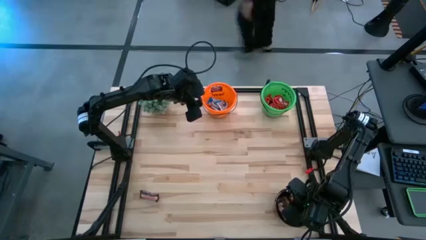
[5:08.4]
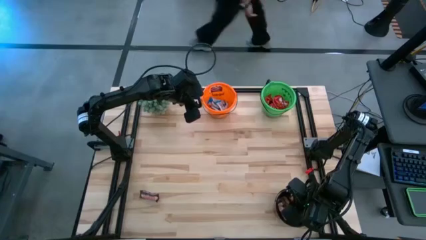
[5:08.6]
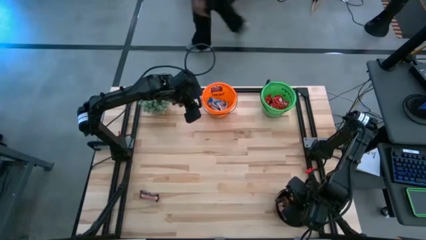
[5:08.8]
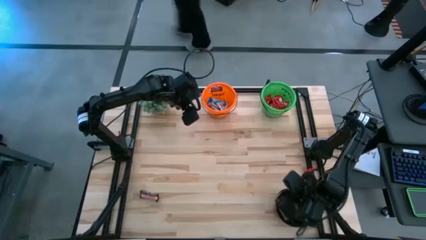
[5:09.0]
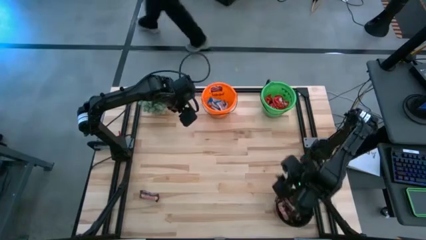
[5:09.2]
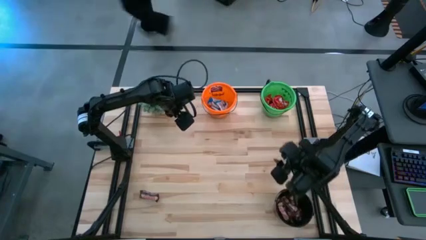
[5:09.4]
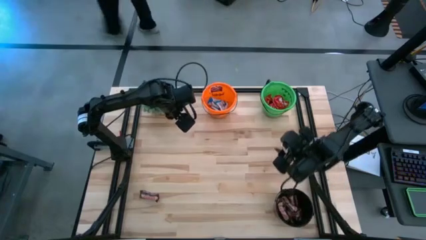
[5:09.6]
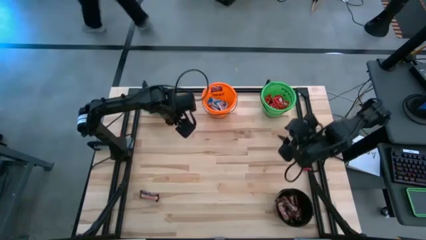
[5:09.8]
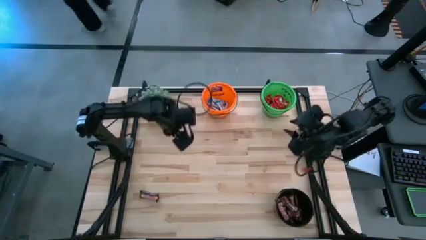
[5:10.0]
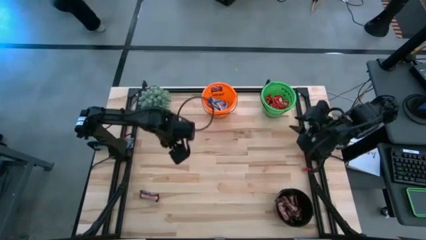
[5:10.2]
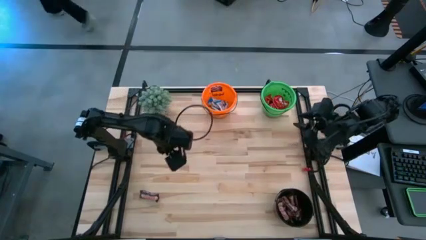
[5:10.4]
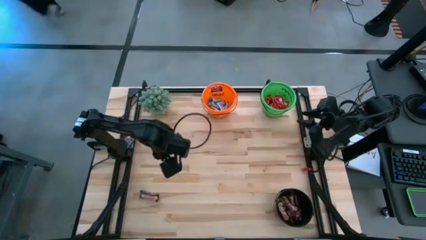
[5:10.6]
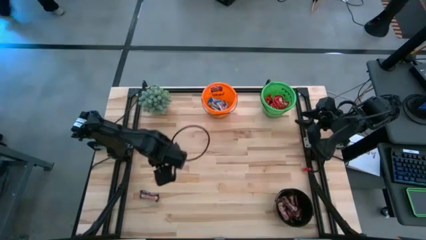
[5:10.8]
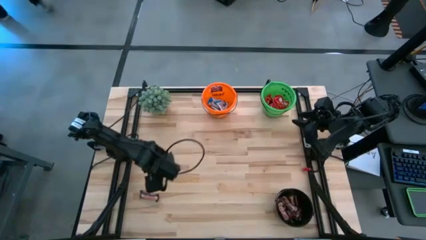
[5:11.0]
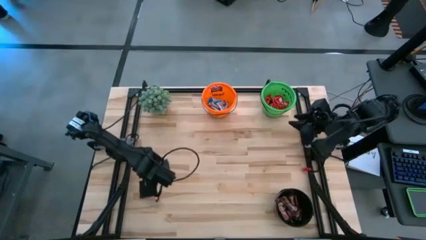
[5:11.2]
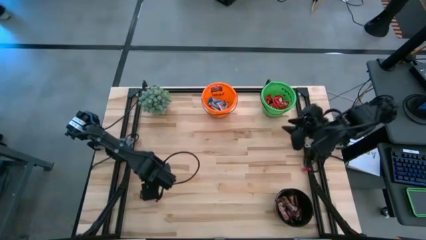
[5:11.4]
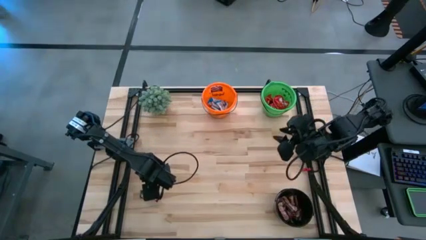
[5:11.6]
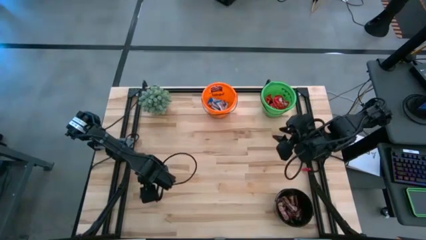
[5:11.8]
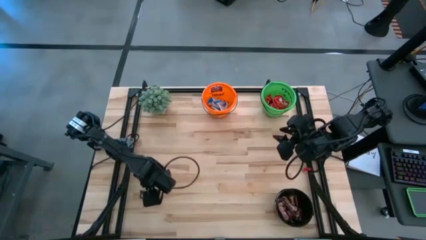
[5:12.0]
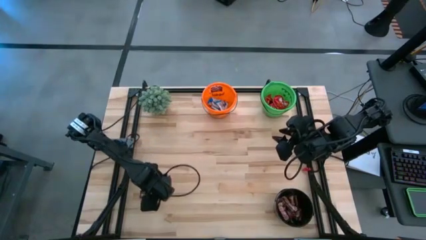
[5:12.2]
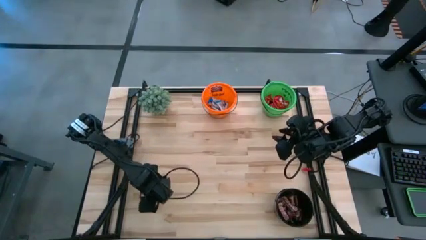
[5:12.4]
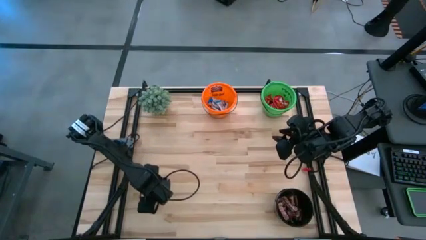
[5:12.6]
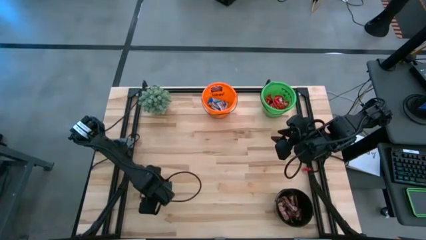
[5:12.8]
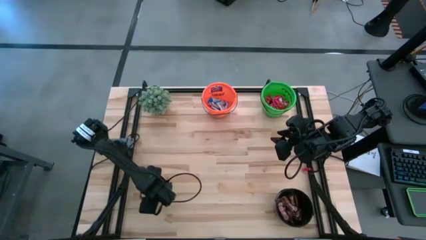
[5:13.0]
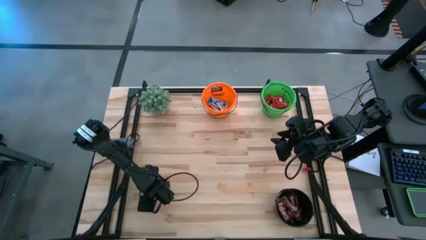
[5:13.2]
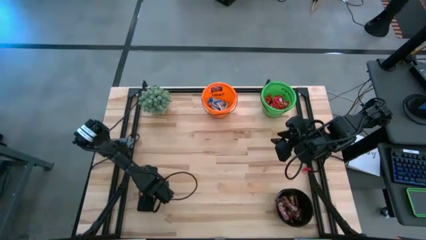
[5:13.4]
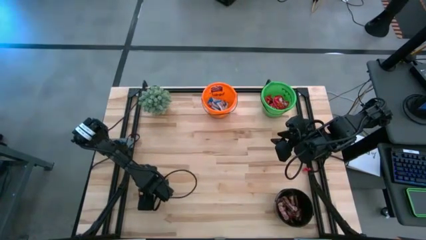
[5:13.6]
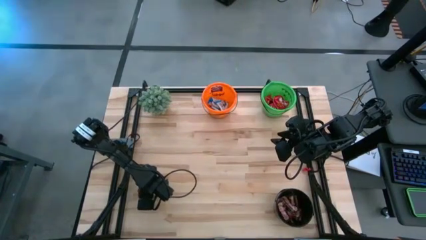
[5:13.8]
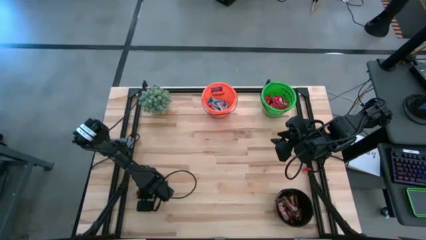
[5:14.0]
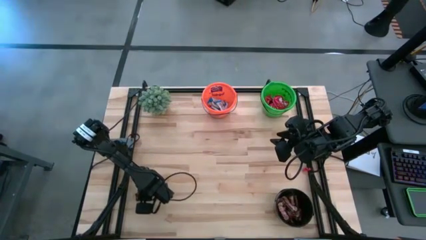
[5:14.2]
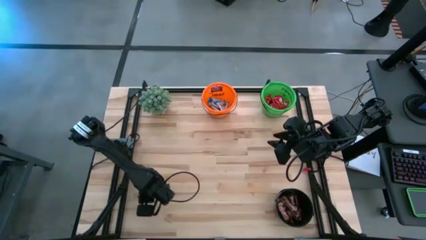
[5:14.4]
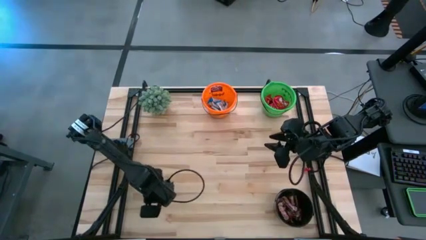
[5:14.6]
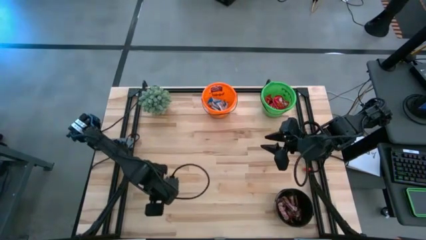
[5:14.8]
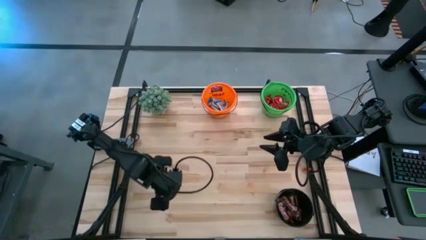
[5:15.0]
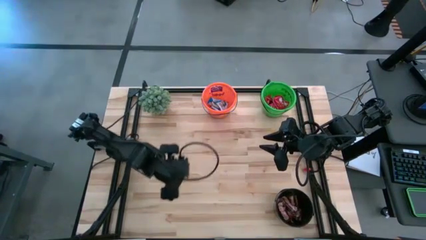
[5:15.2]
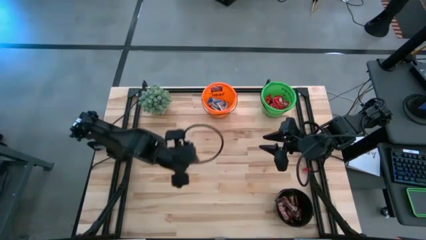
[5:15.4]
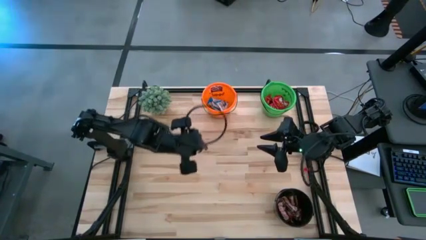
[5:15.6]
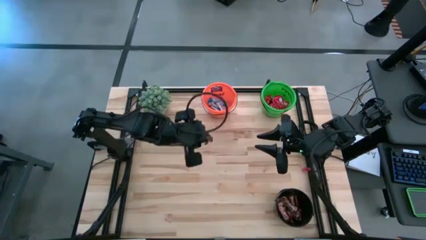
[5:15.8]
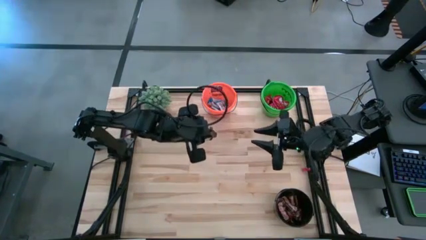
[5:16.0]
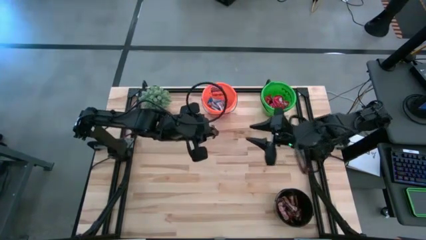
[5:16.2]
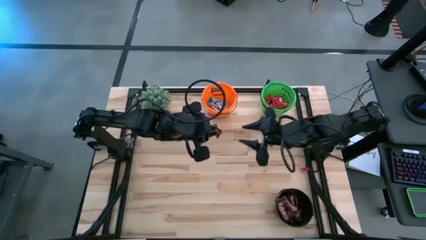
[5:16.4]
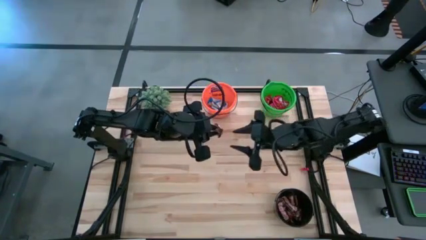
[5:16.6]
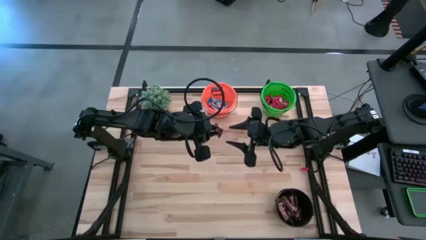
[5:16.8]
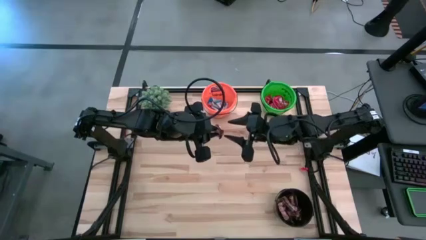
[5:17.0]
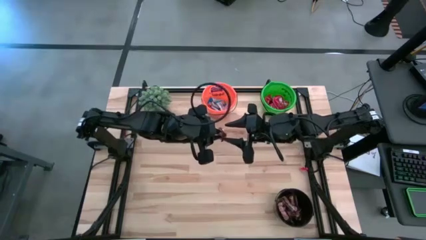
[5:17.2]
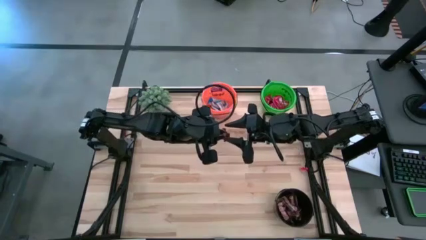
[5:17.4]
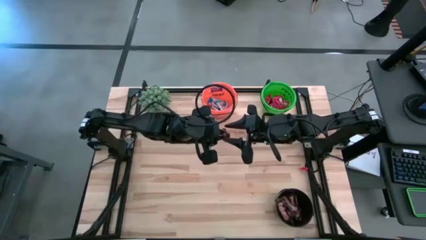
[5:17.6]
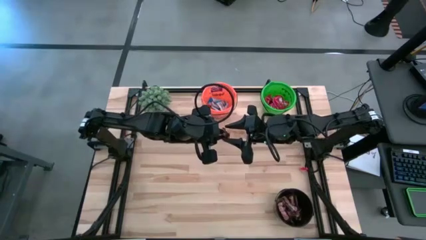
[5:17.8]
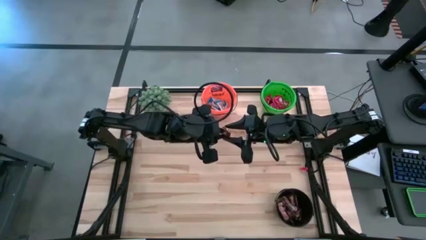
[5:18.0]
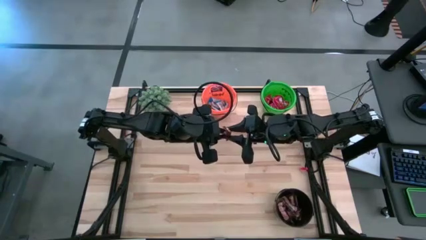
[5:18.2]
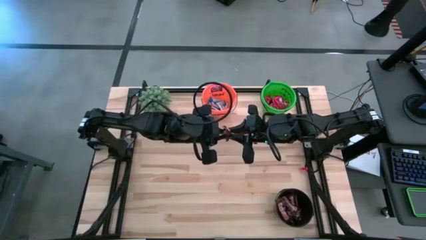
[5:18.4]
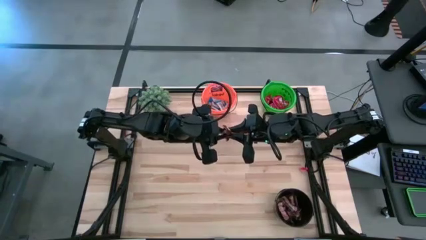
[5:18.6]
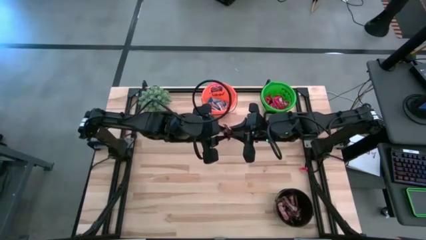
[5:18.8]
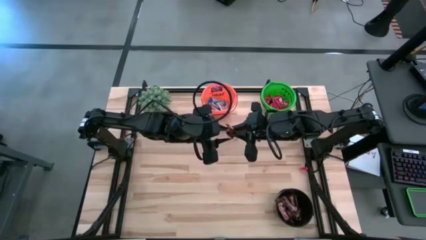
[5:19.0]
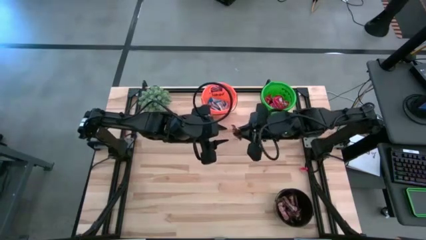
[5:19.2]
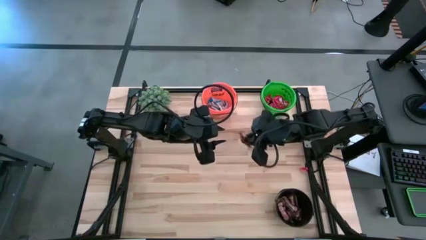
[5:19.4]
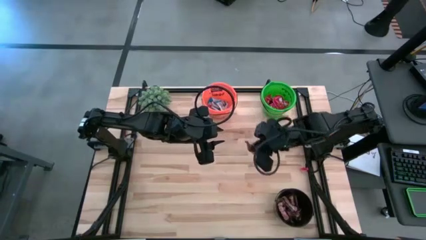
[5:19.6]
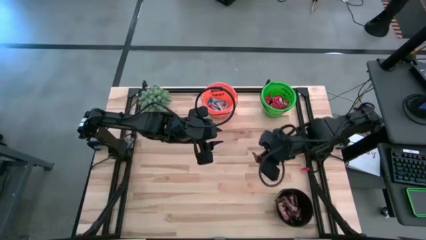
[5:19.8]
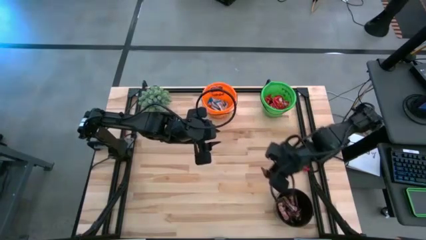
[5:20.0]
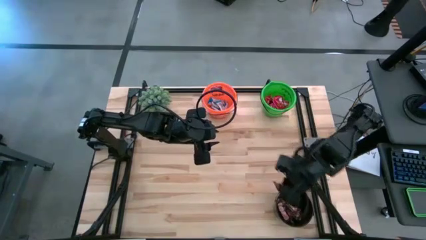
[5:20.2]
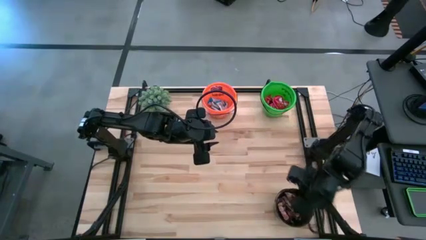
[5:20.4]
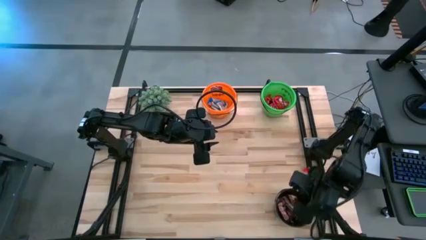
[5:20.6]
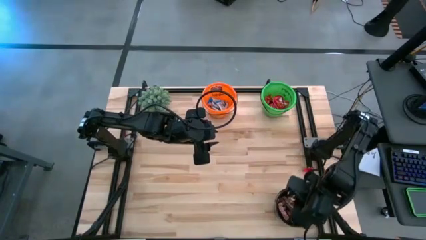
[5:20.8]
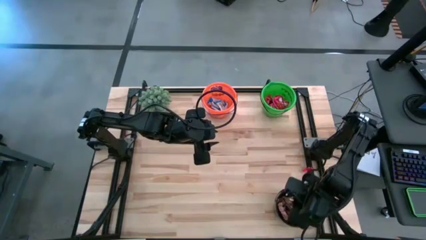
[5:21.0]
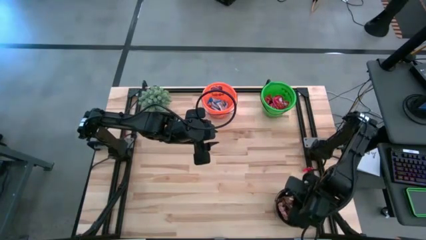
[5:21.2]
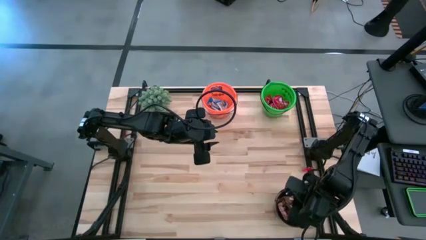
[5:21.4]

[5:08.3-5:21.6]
Task: Organize candy in baskets
Put the brown chocolate bar into the black bucket

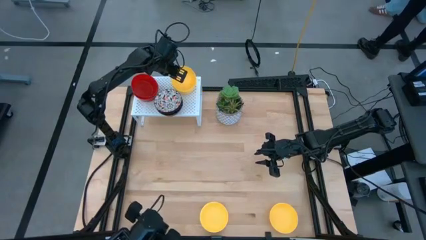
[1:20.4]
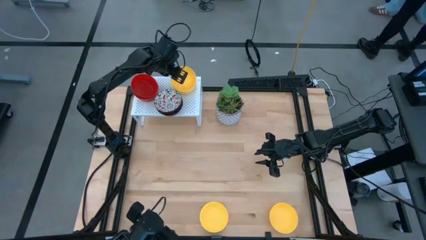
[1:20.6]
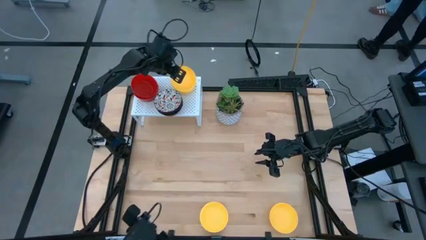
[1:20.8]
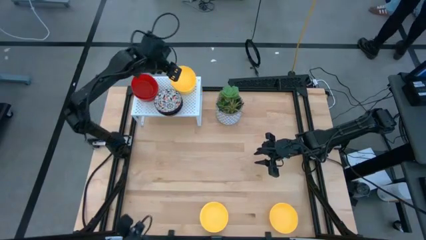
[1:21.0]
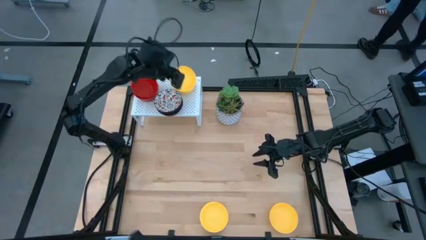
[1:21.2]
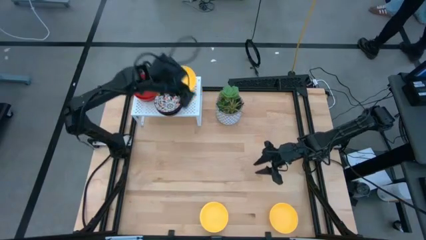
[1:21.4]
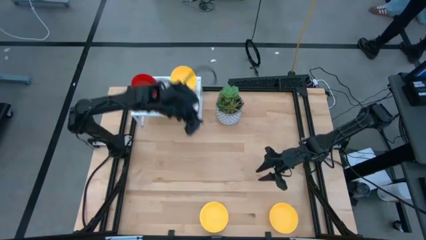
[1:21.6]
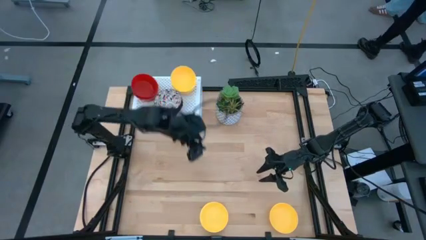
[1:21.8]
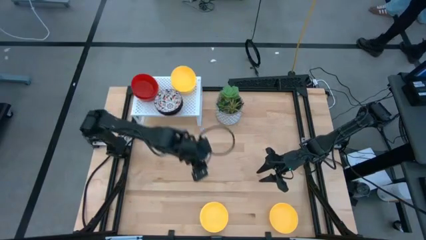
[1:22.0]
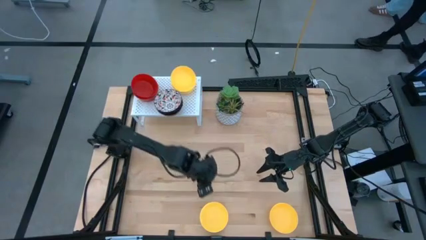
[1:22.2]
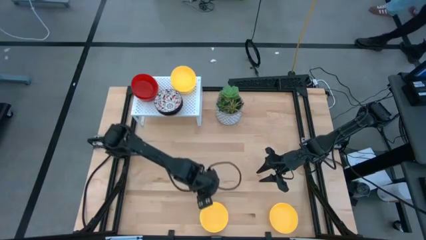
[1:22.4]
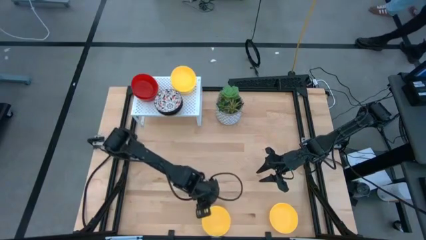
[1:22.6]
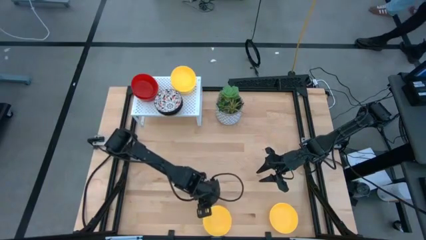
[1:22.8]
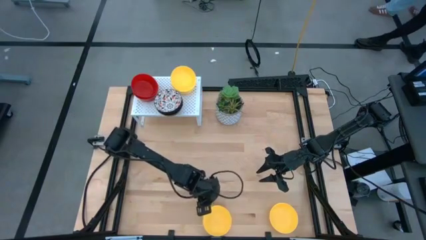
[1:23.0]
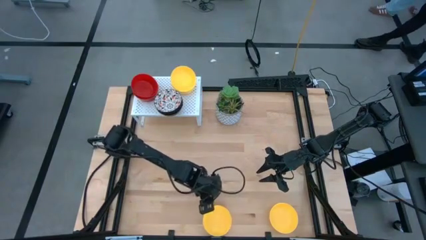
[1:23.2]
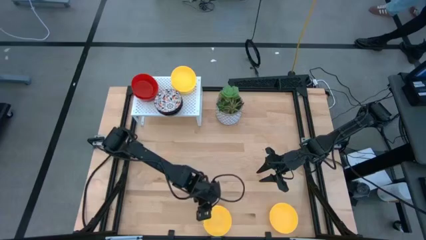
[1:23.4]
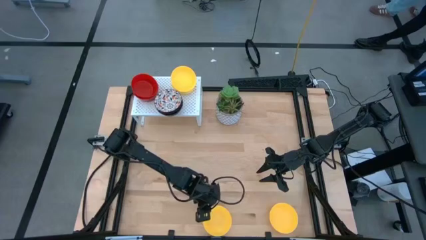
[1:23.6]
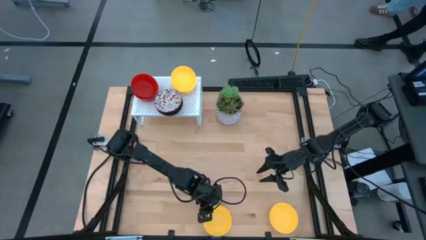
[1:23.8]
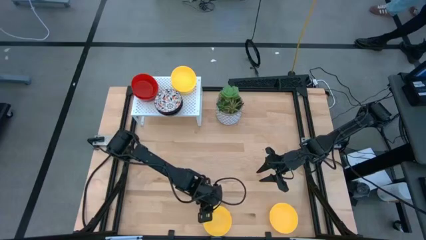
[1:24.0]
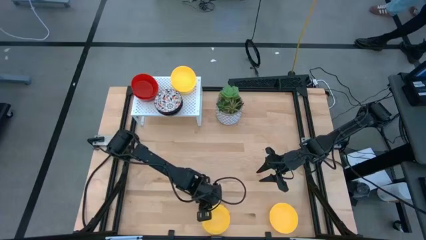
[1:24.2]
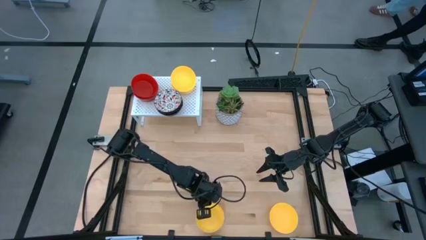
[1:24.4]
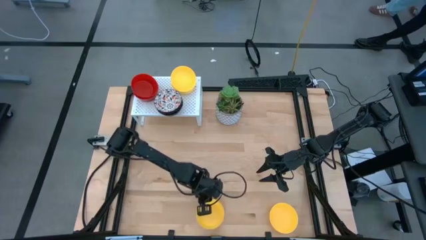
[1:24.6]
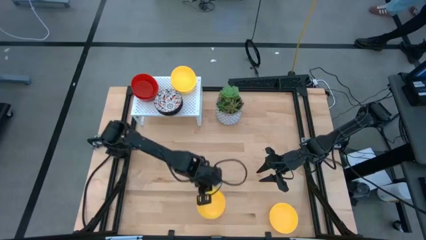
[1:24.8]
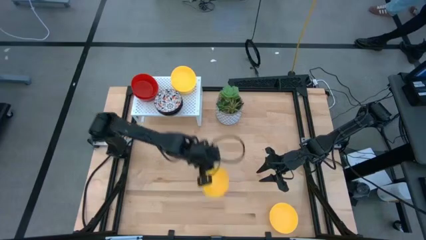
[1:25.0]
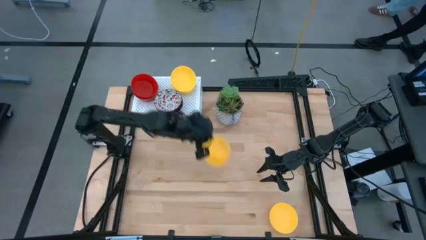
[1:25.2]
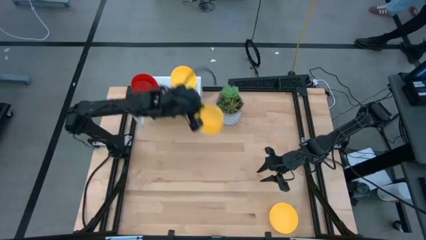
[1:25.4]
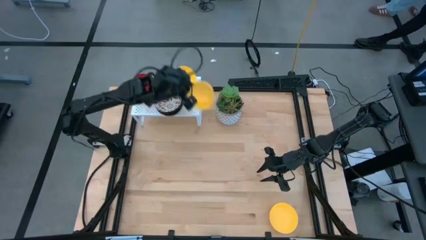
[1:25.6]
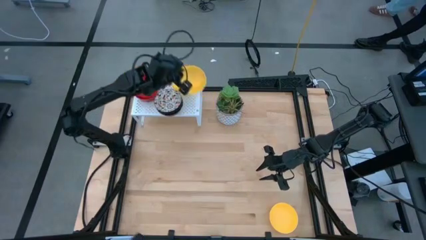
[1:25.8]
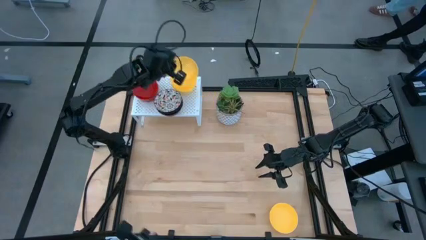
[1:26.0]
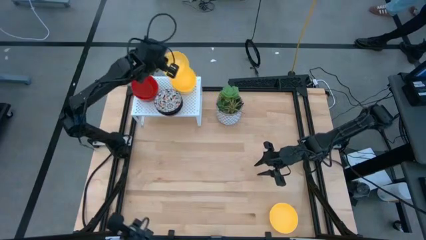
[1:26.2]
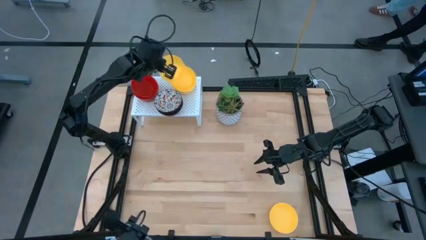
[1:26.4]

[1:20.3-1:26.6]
Task: Pick & Place Mini bowls
Stack the yellow bowl on the yellow bowls on the shelf
